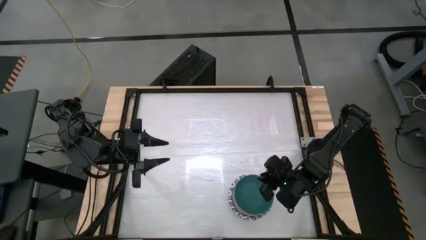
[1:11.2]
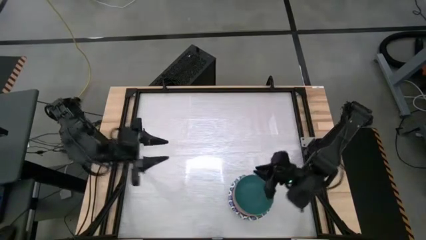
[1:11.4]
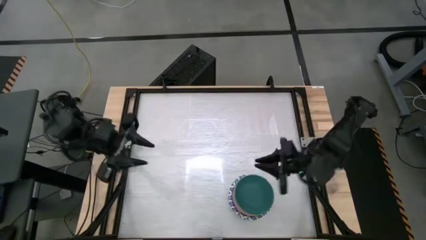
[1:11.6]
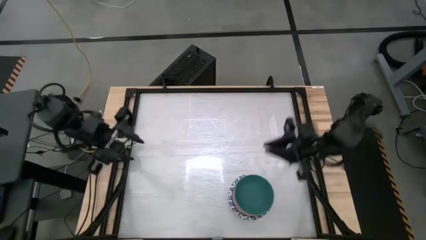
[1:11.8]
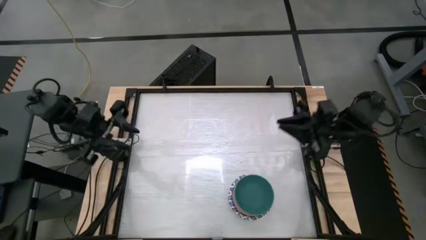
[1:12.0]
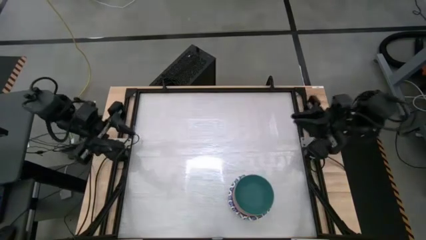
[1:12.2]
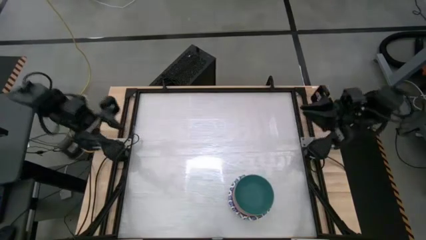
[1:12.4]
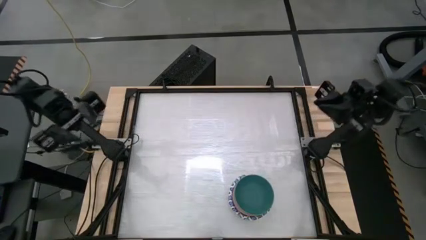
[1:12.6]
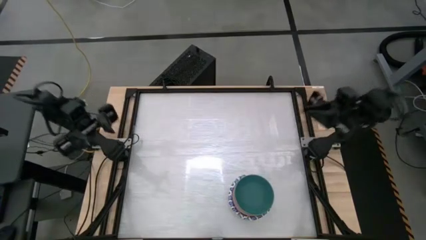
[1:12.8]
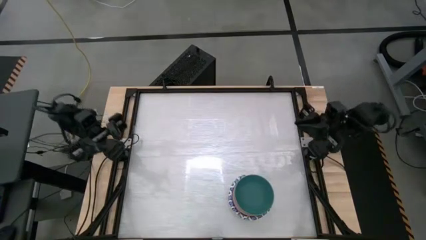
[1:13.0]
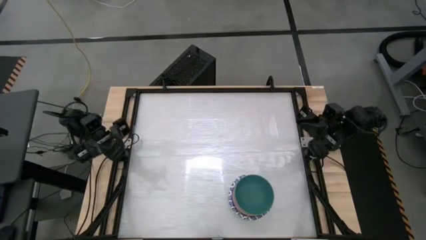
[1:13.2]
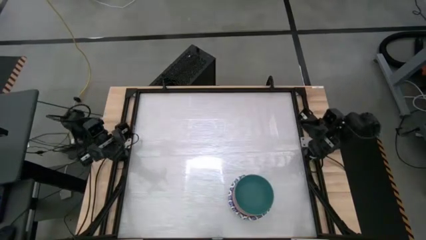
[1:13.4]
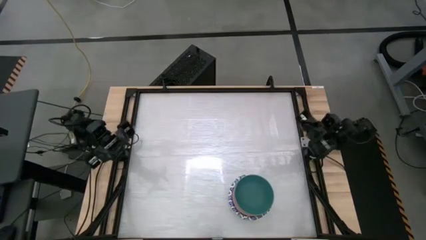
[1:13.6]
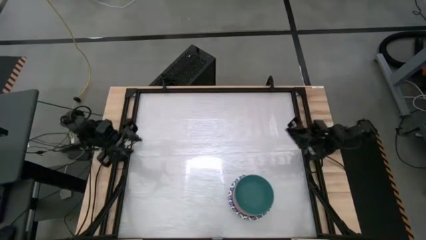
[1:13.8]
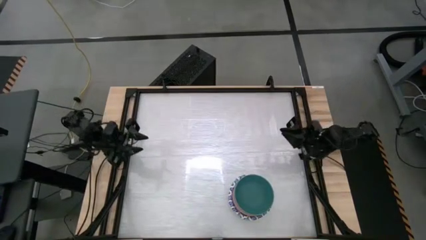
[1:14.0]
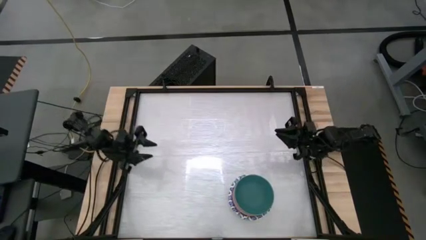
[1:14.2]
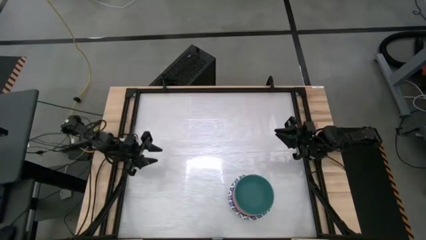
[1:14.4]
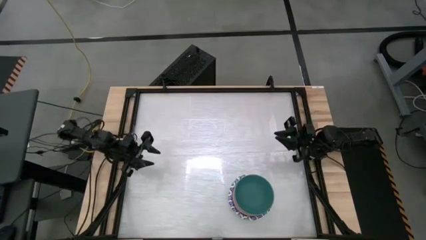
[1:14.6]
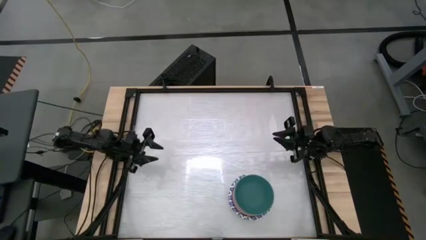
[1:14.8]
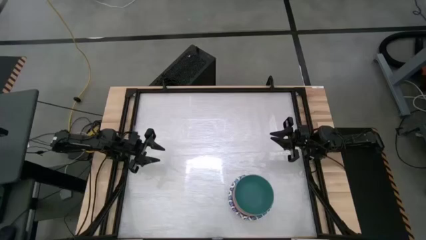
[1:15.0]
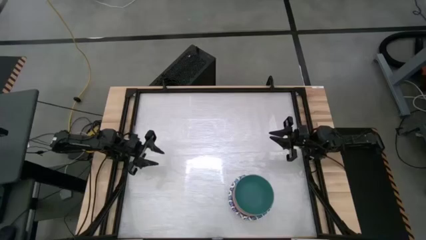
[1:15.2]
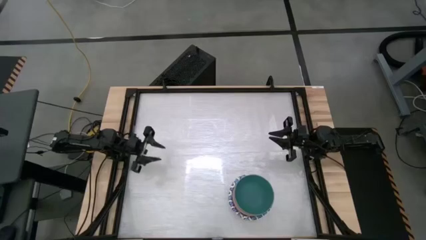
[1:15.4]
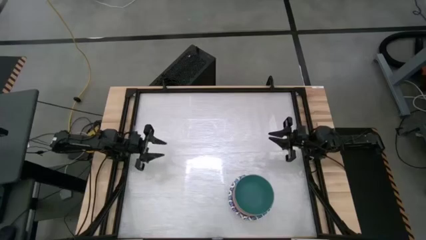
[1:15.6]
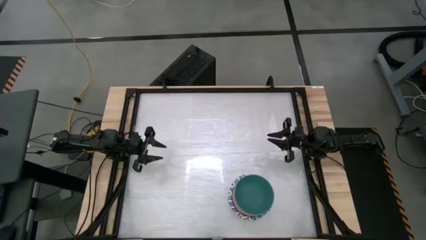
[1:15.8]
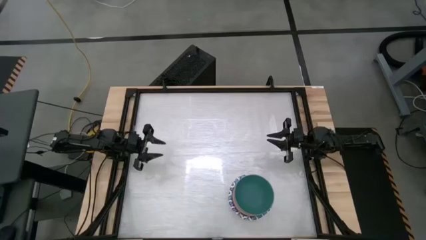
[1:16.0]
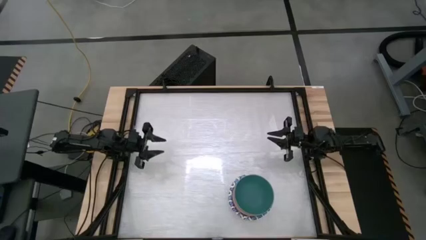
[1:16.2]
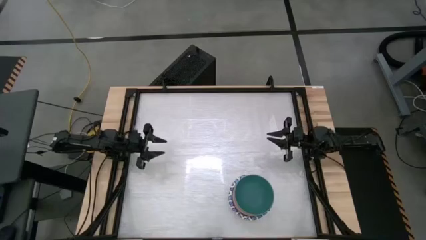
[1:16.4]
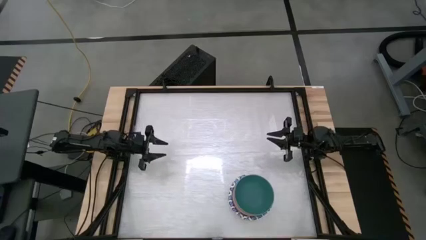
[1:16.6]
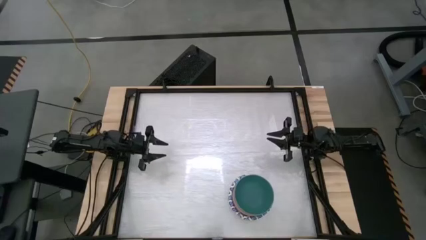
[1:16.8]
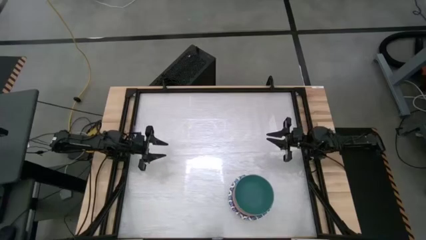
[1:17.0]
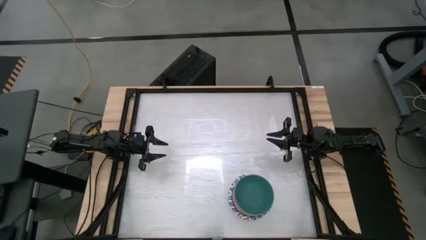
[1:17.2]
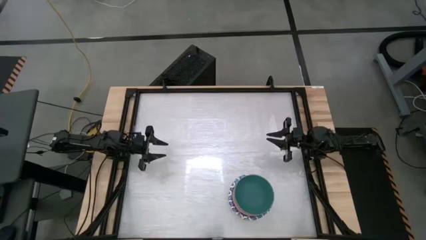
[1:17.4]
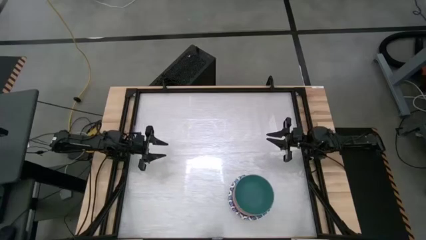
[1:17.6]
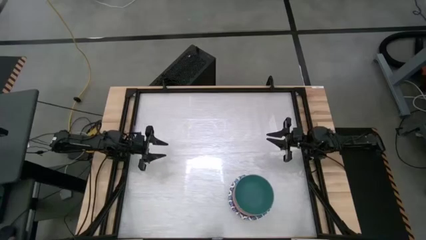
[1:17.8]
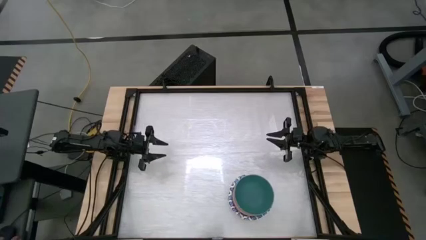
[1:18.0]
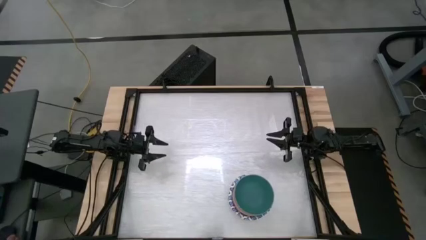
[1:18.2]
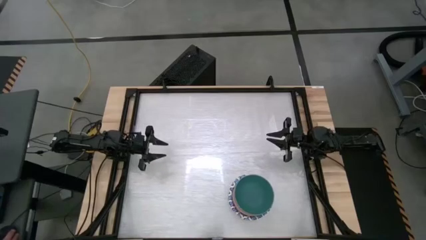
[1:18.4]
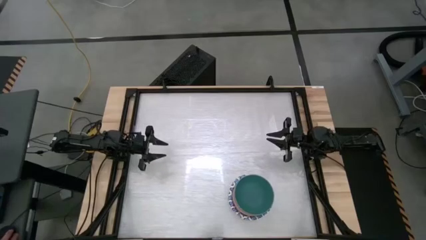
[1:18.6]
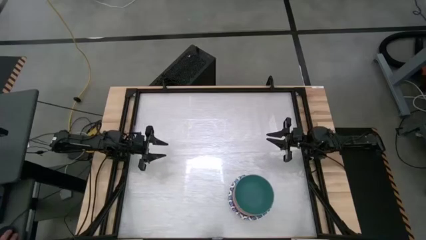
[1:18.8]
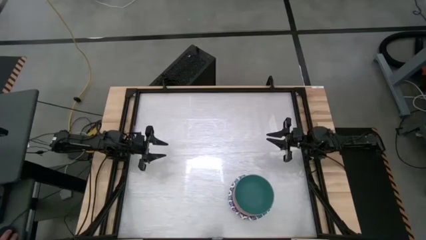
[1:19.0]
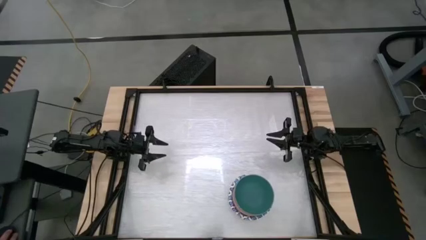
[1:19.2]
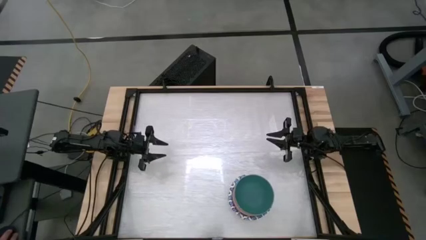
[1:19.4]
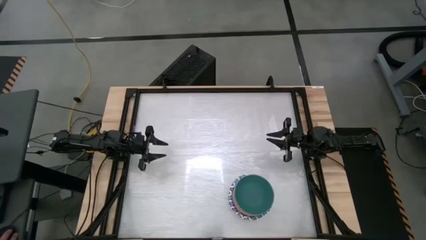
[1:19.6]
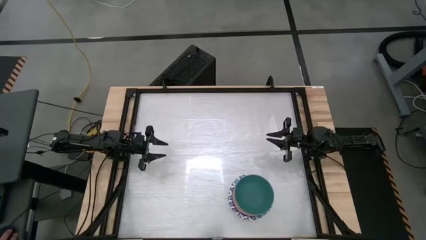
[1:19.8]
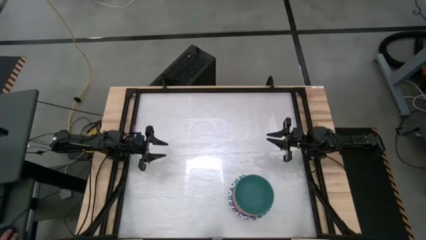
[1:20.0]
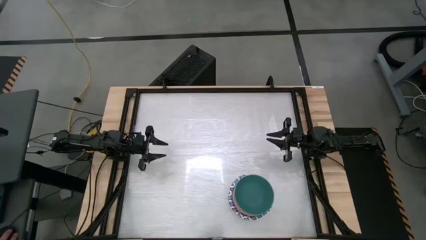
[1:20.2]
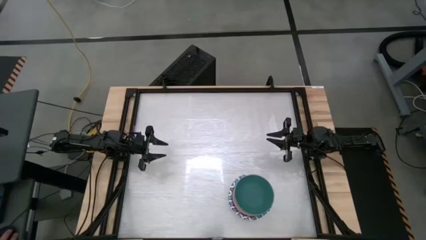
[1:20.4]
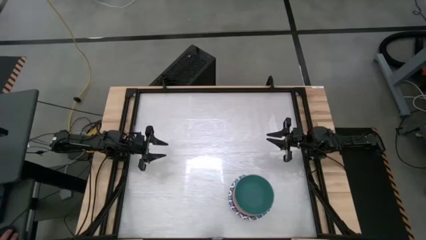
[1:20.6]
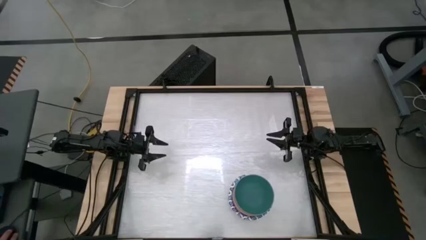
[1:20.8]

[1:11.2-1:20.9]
Return to Home Position
